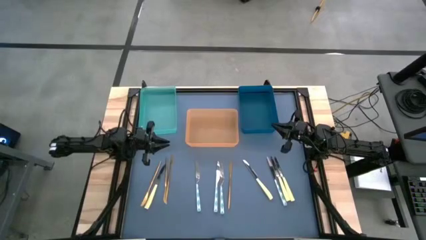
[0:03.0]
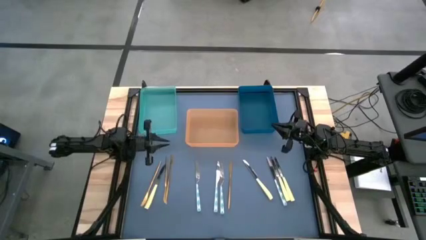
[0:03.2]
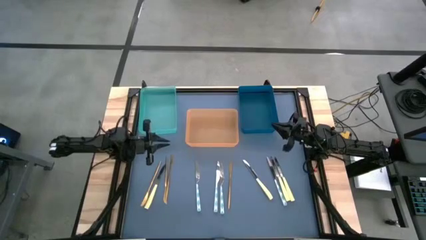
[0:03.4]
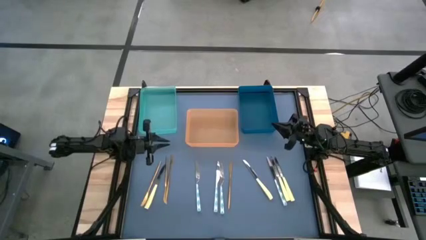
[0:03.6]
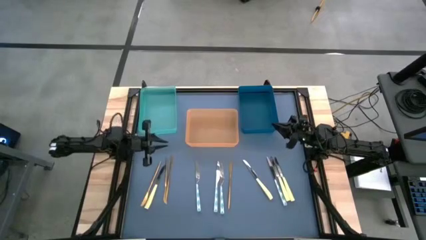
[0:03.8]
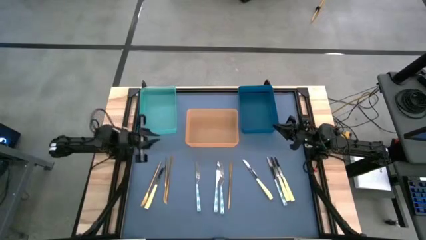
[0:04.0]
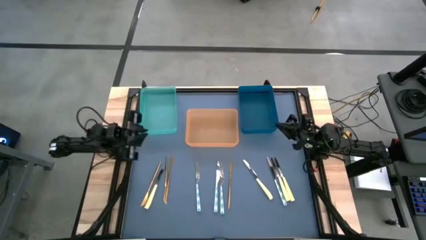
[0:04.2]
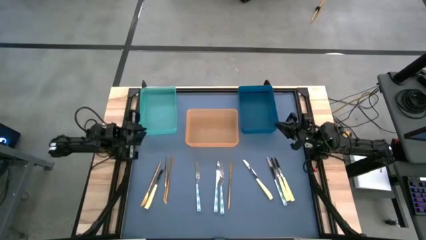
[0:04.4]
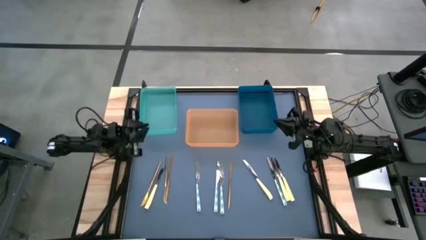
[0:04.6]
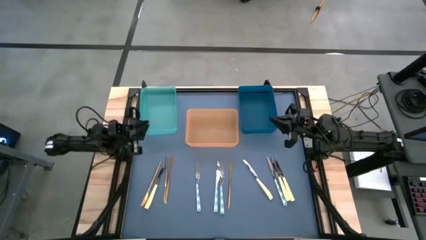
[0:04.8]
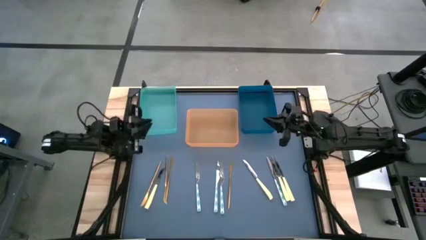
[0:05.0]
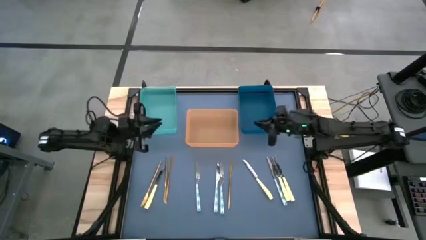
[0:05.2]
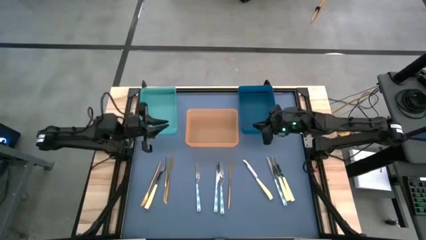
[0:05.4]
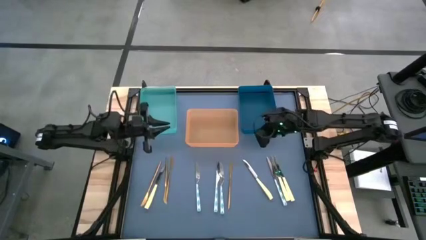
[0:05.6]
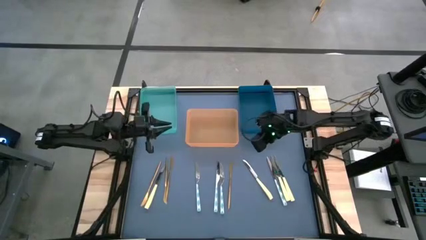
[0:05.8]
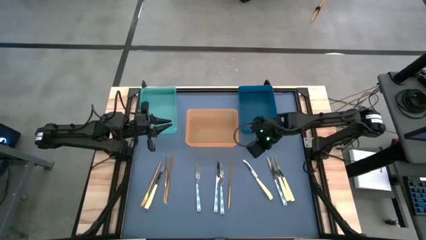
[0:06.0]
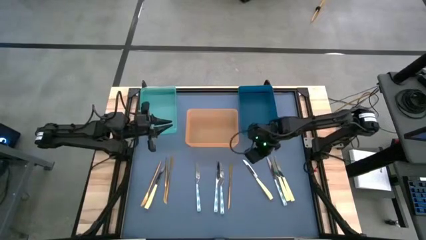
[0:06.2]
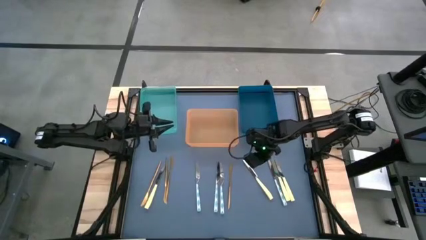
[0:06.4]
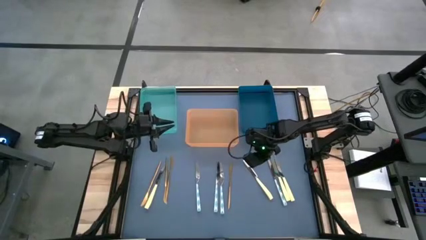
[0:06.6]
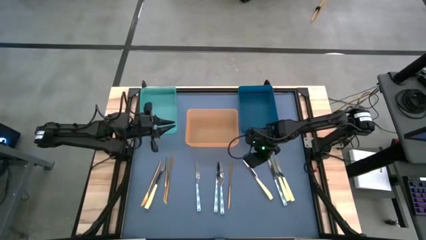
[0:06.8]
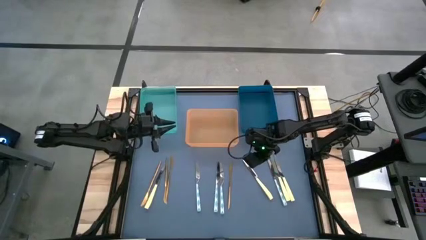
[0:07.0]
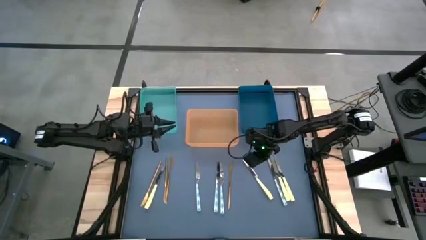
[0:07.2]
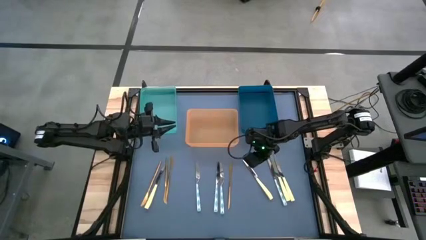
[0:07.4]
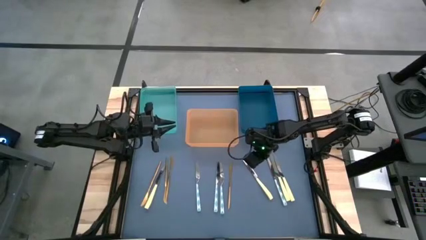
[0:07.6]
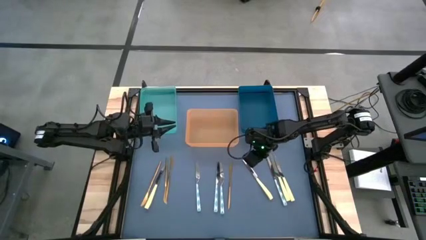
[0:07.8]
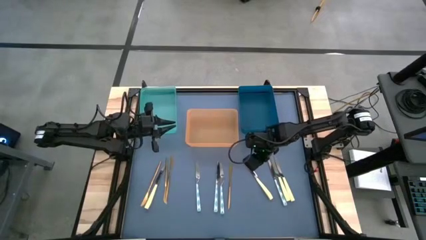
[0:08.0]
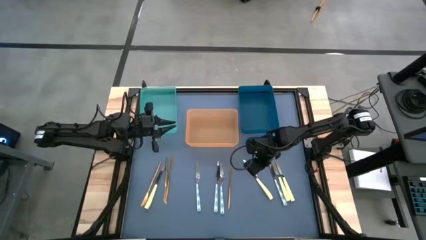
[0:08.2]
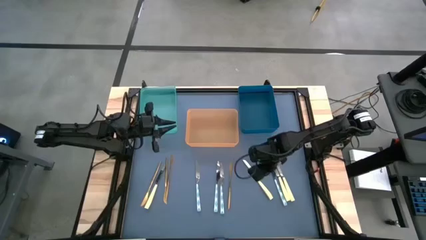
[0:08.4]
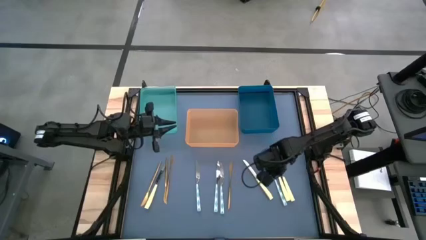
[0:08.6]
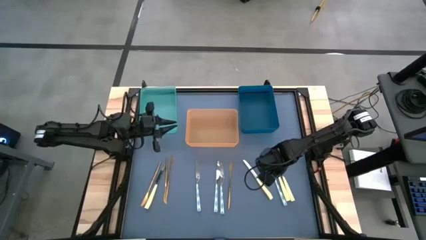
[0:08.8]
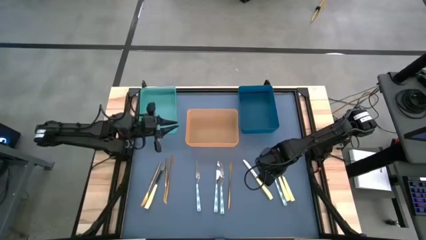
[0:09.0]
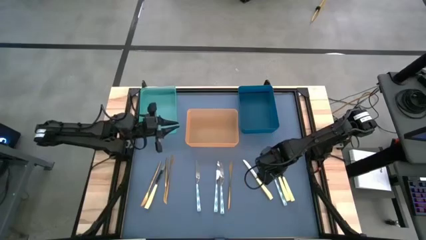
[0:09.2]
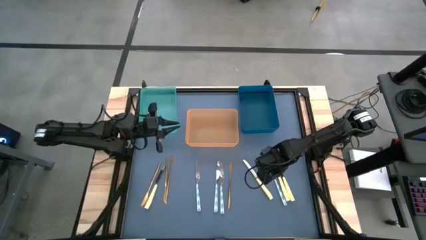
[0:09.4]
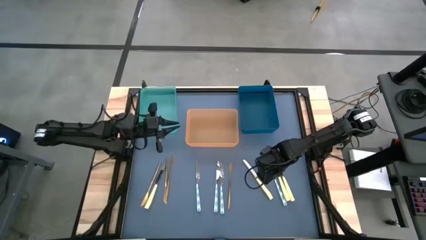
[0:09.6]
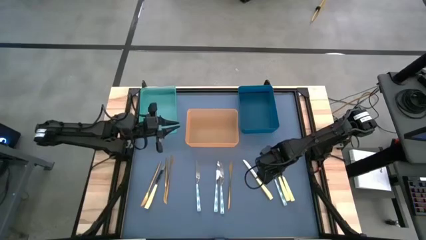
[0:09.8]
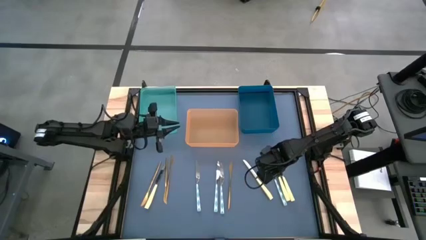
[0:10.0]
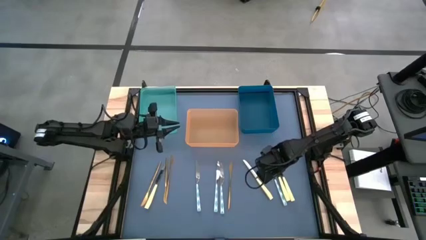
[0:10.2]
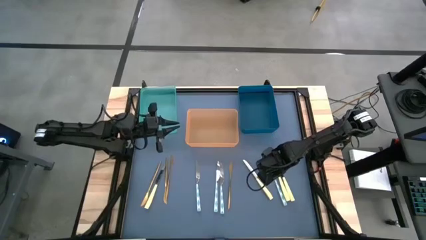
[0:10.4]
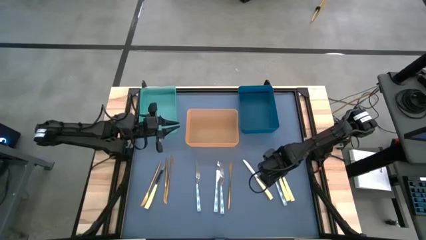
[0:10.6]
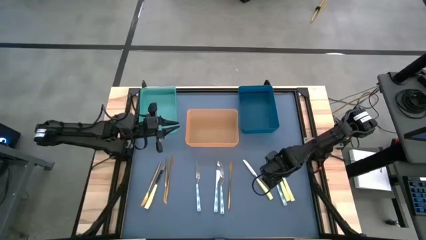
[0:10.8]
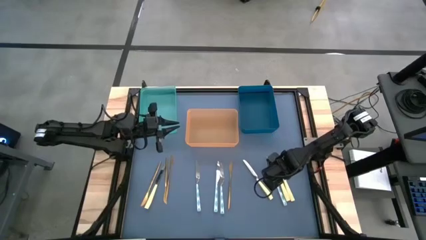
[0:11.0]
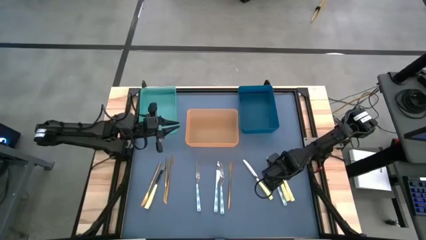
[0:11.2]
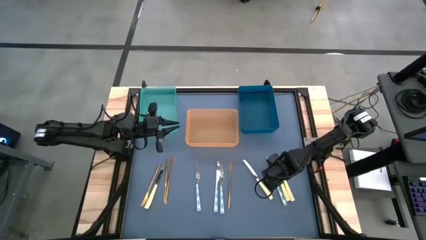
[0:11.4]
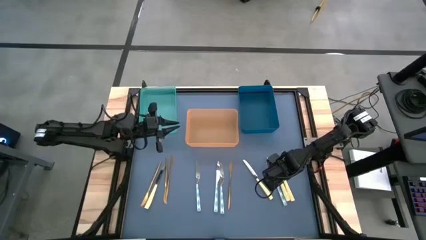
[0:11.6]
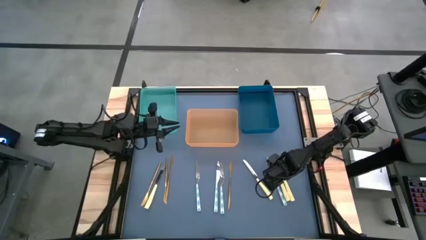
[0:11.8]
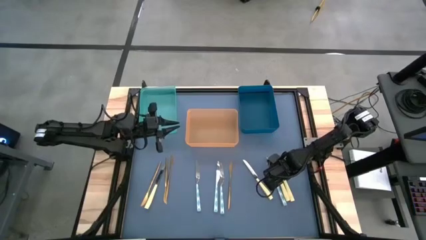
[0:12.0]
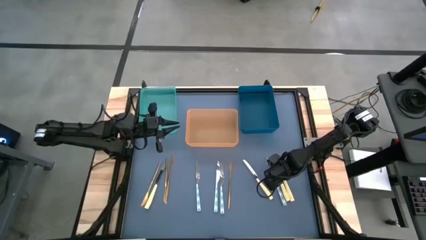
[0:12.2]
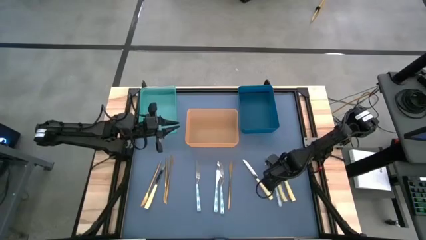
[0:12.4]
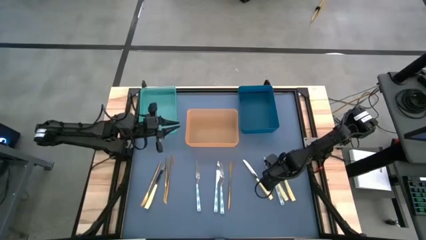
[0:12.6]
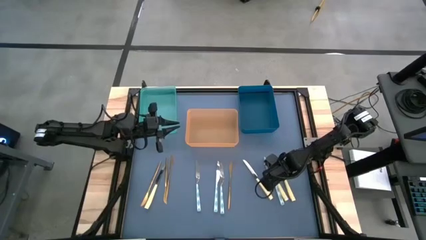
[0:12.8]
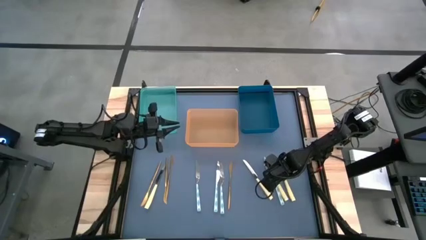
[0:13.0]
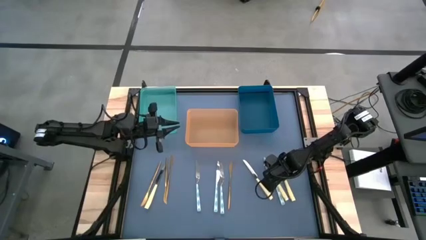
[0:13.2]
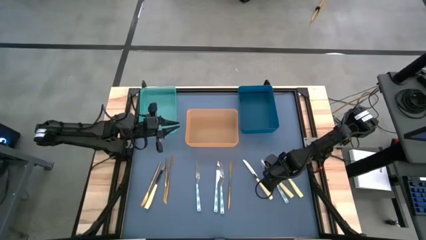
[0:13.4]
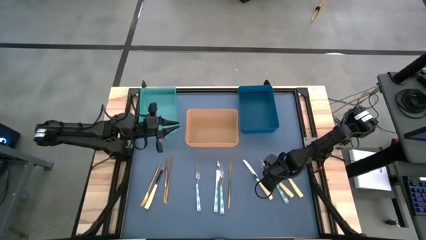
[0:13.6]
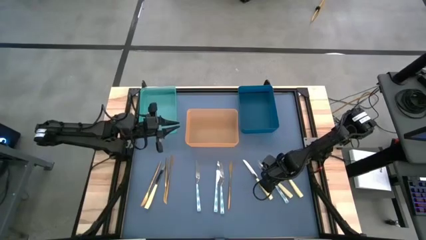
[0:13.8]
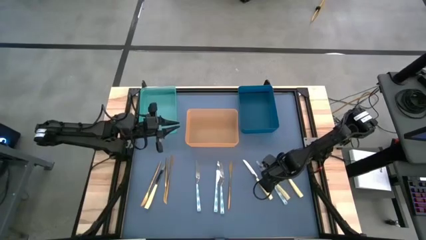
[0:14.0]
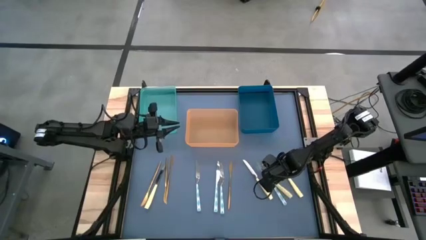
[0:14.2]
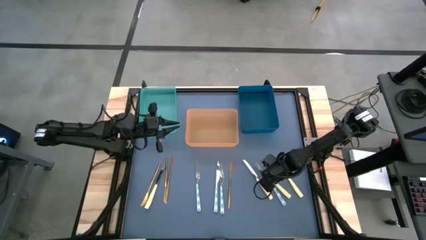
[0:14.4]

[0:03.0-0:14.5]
Task: Sort silverware by color (type)
Put the yellow knife into the blue bin
